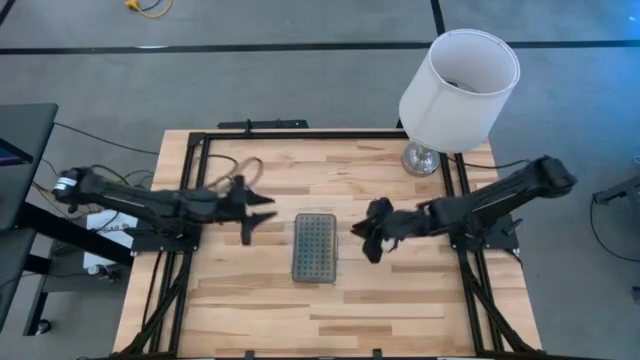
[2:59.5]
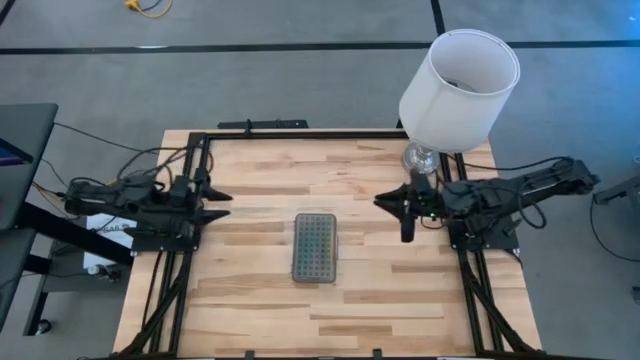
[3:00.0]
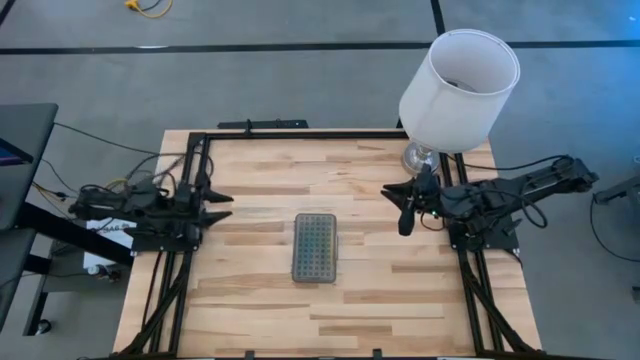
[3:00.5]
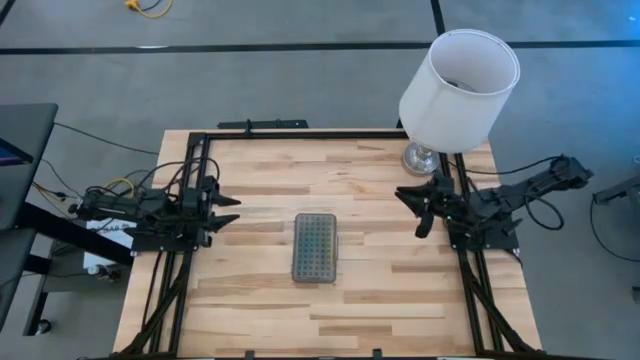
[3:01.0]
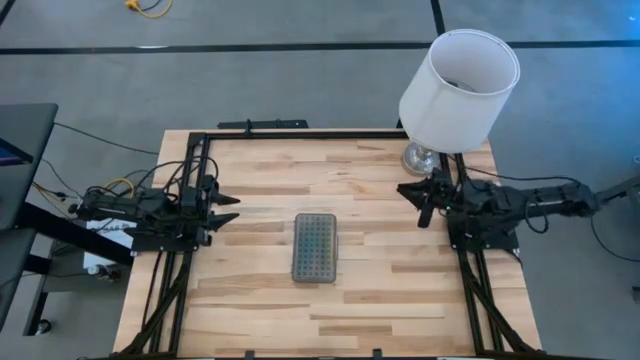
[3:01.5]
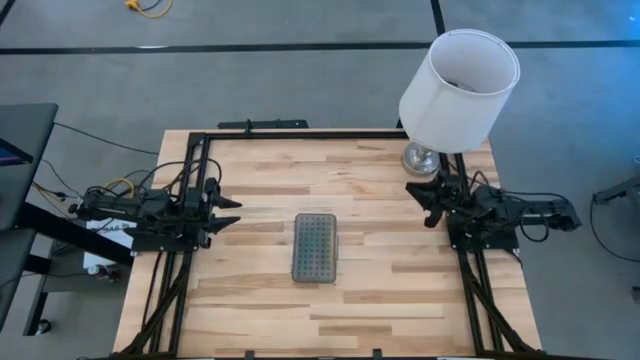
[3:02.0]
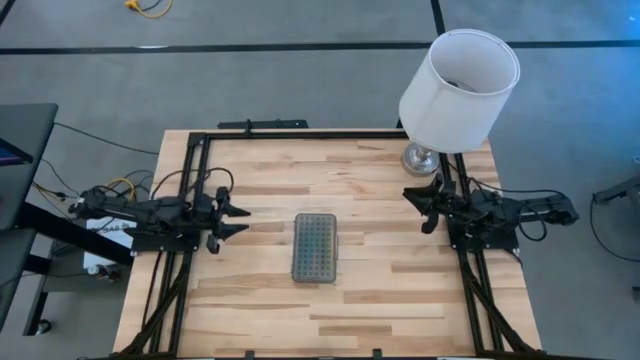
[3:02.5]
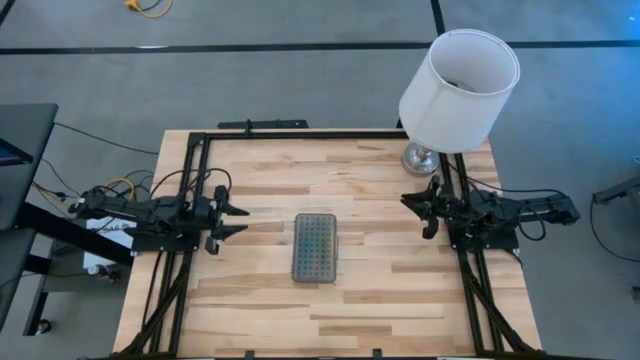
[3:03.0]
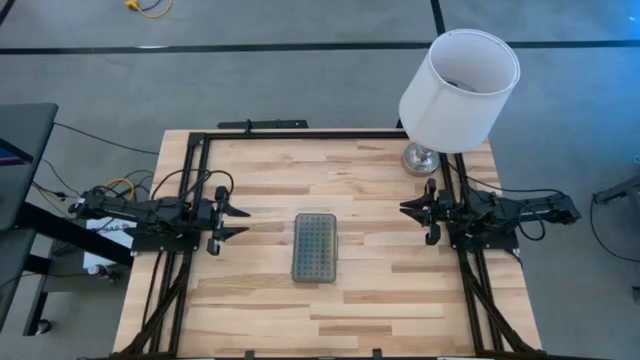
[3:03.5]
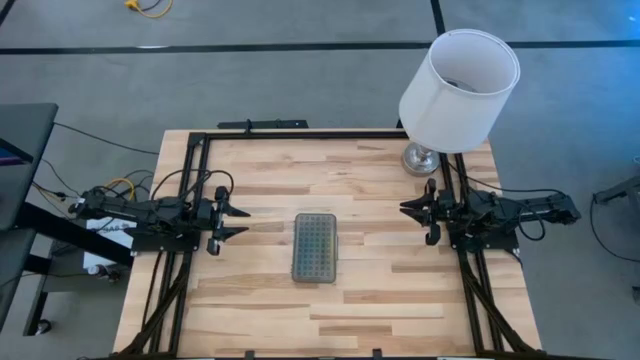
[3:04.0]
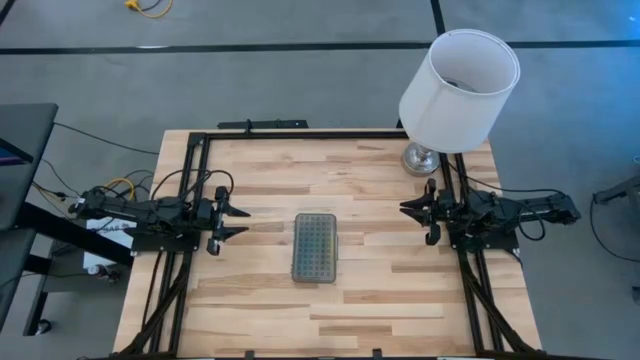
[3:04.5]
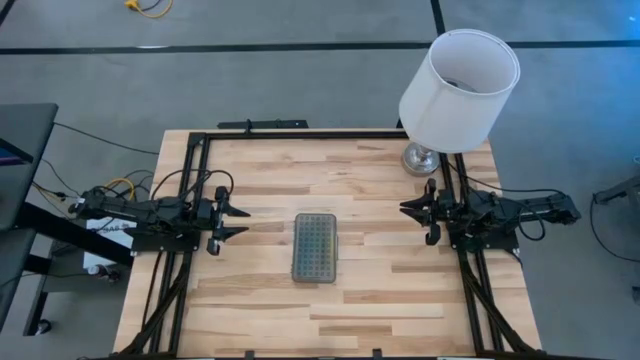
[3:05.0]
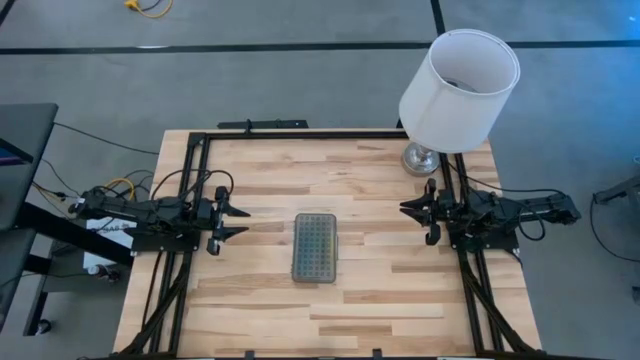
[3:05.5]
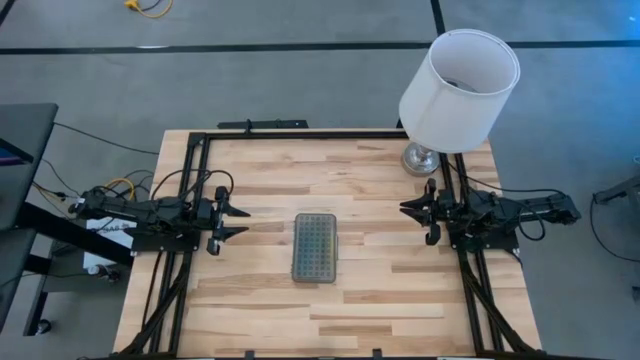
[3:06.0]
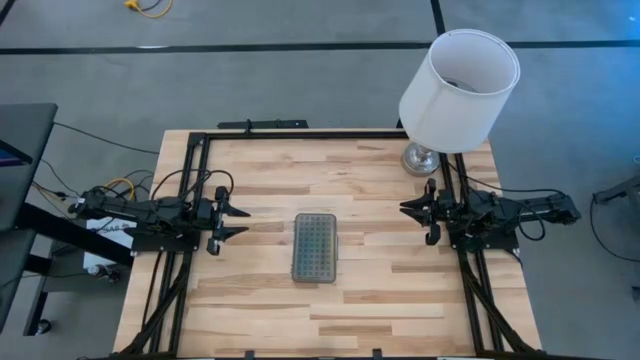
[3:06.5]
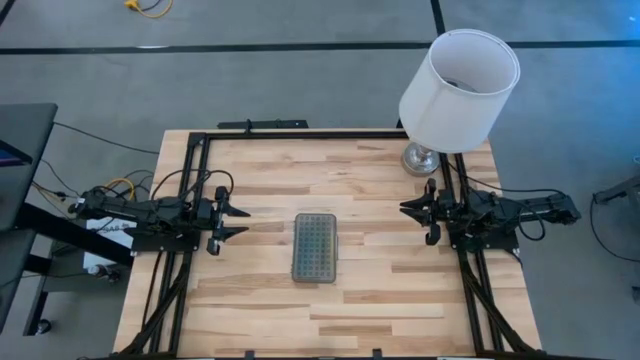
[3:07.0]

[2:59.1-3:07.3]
Task: Pick & place school supplies into a supply box
Return to Home Position

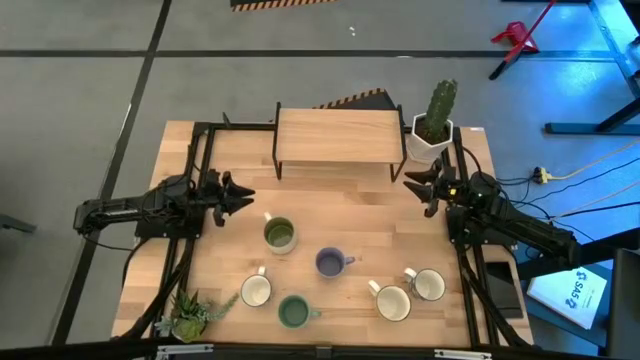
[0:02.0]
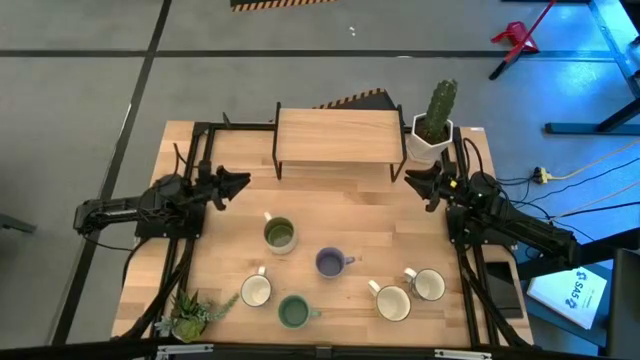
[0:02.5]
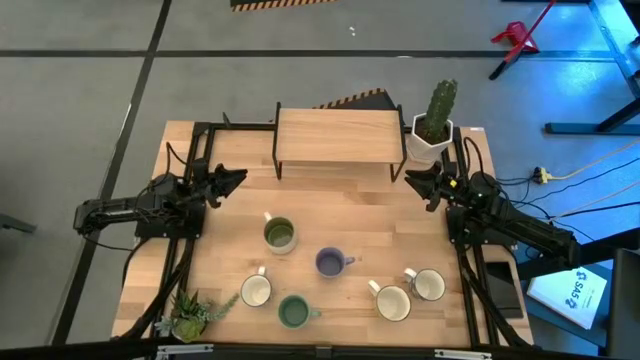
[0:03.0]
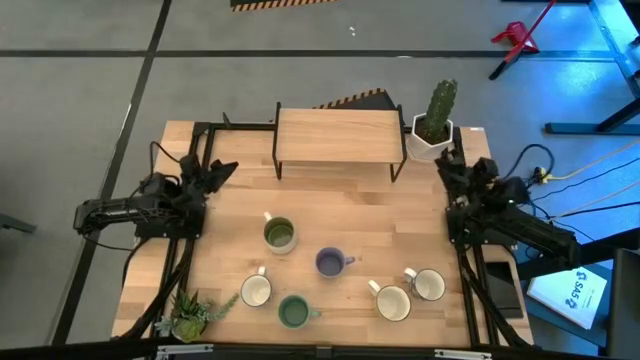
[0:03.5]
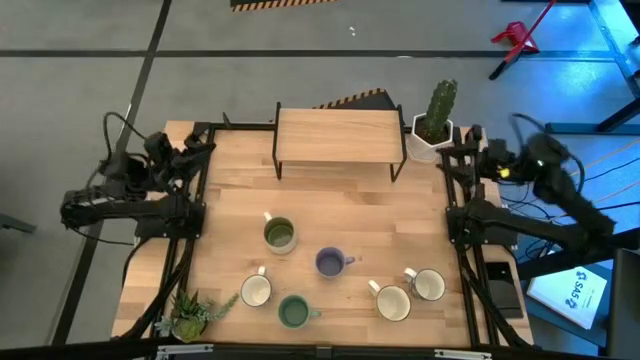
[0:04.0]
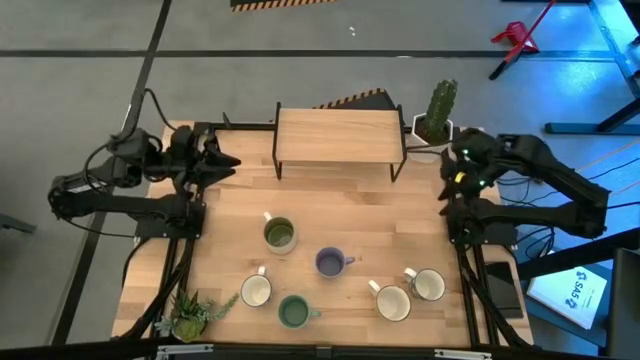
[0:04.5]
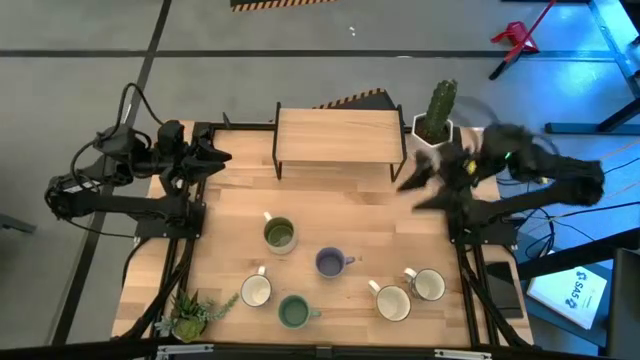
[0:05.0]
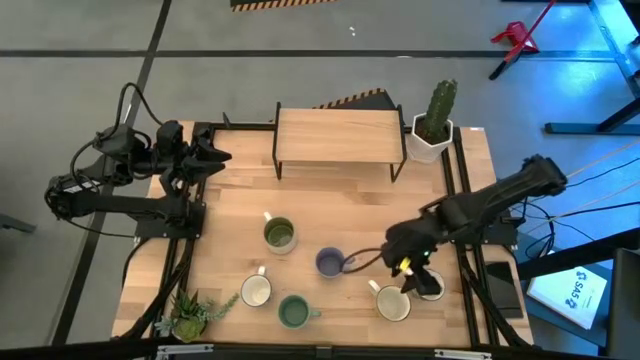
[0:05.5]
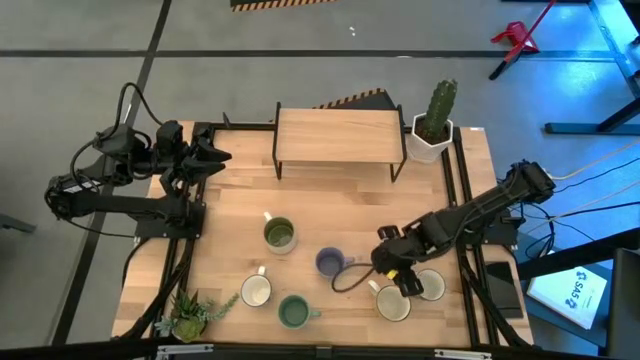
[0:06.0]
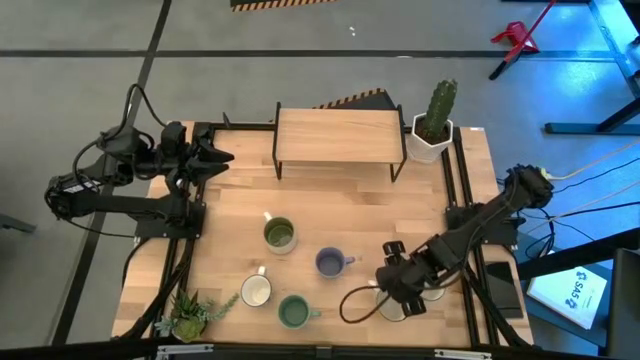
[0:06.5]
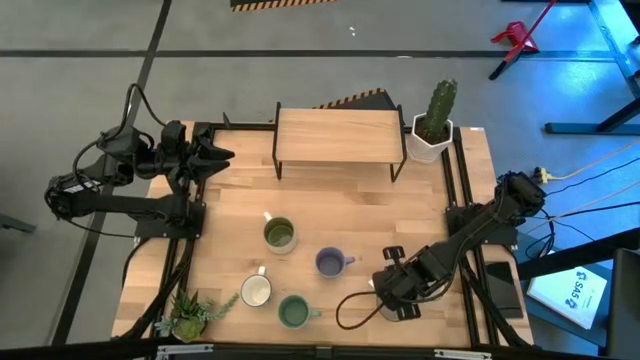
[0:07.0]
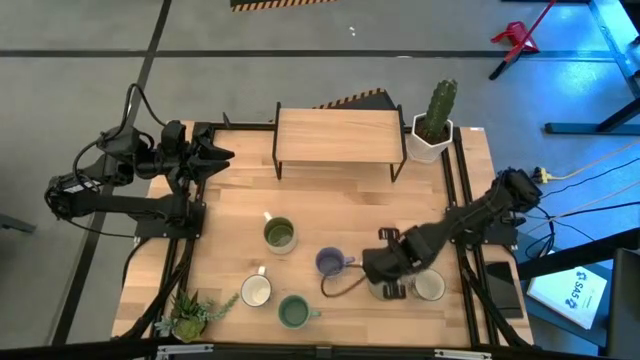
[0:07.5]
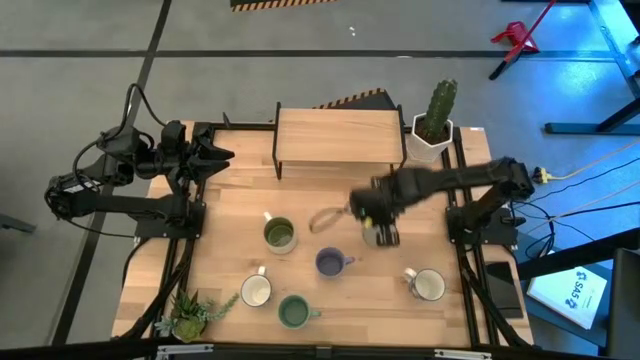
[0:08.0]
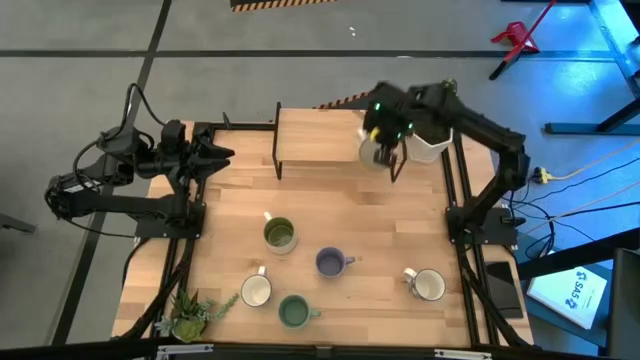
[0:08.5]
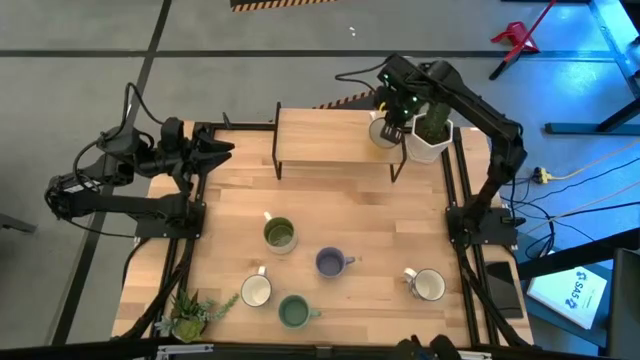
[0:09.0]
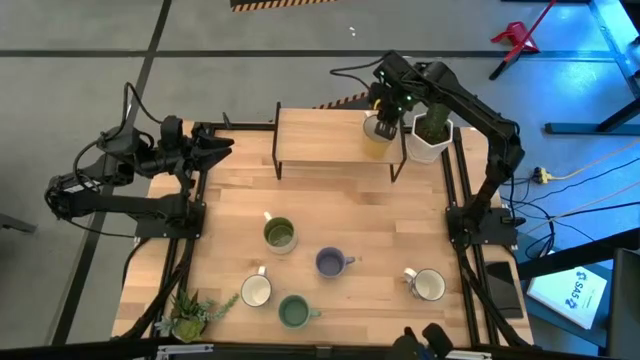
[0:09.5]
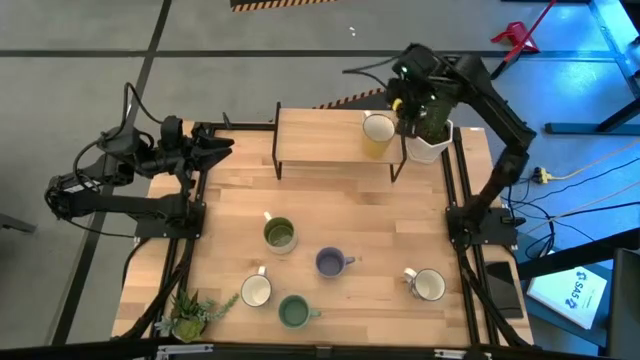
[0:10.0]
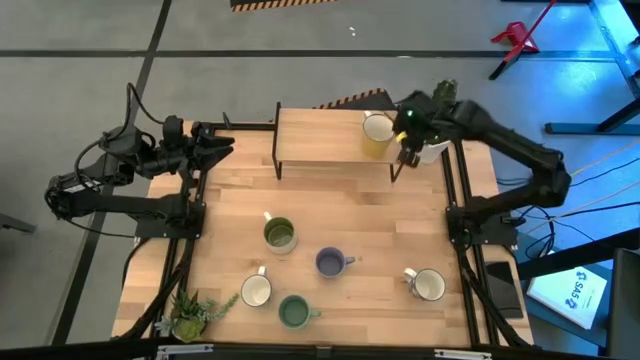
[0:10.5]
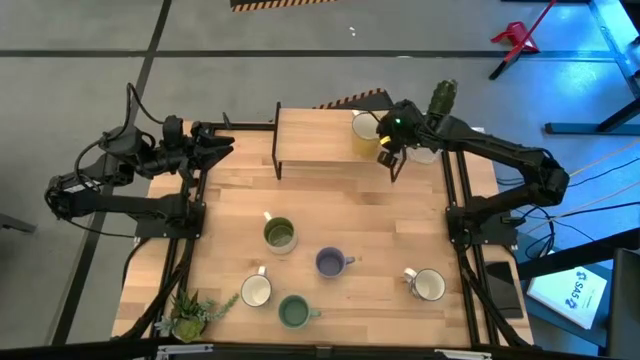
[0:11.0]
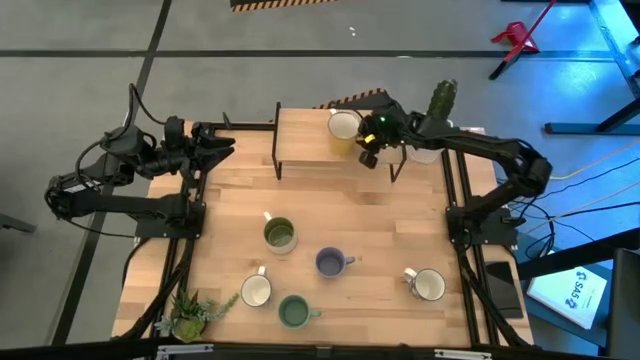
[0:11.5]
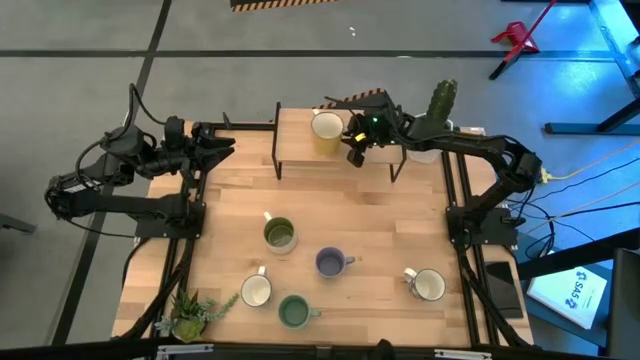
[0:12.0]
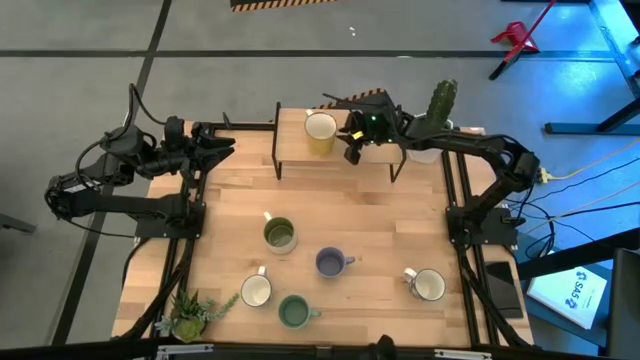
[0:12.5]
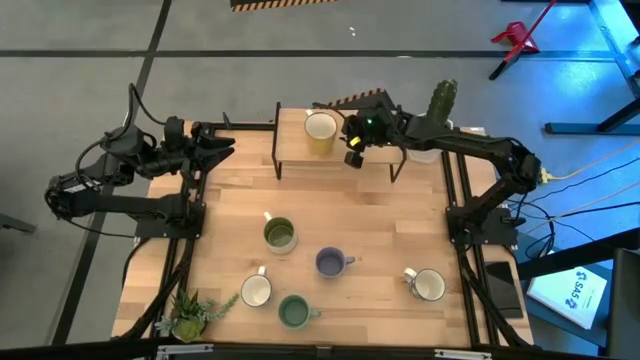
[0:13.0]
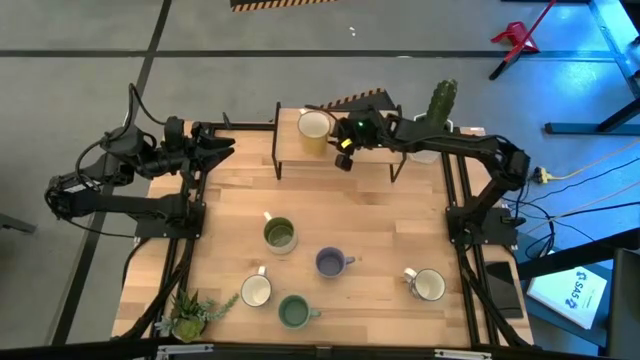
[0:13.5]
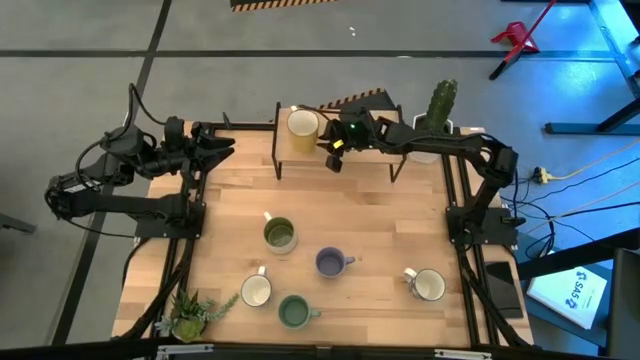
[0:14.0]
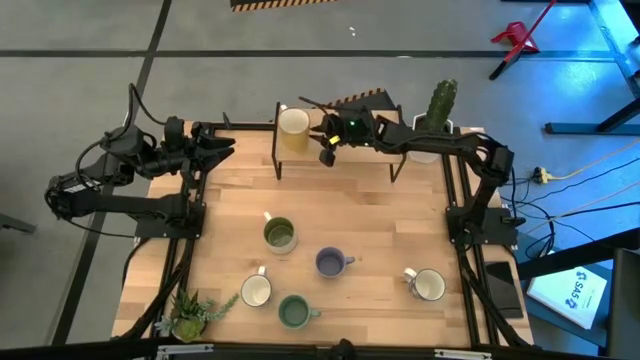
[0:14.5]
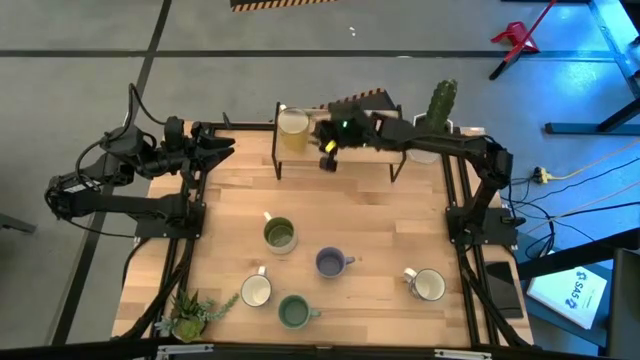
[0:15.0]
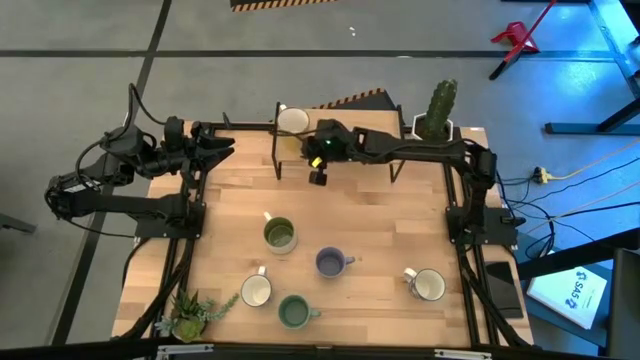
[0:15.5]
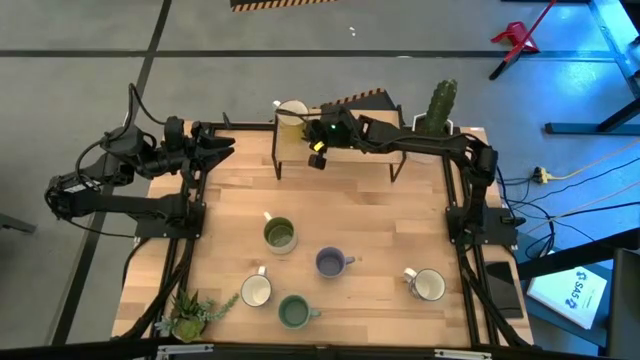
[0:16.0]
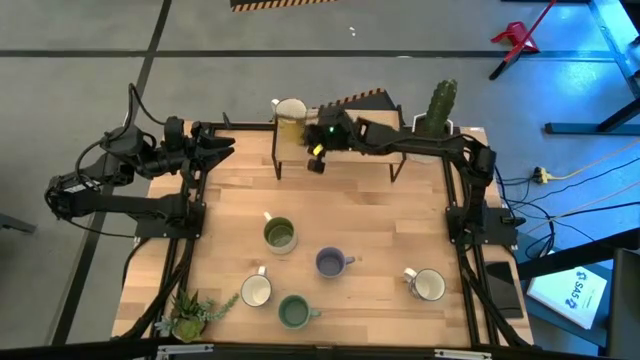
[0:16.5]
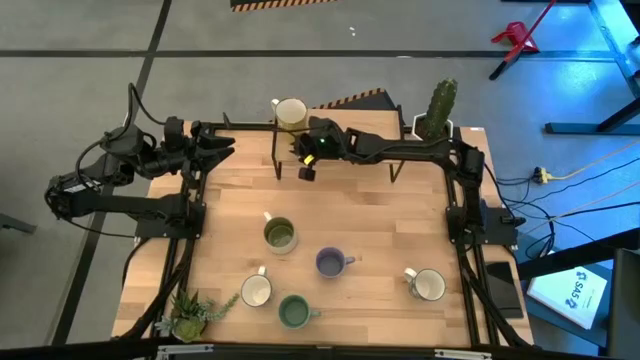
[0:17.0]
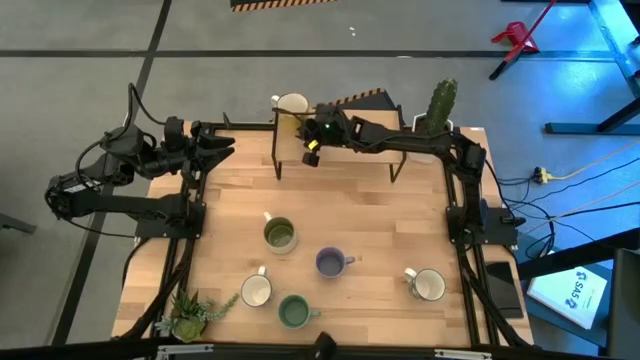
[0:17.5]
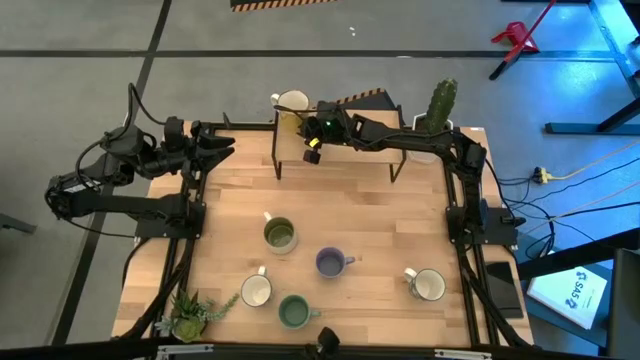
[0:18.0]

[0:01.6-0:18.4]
Task: Place coffee mugs
Put the yellow mug on the shelf
